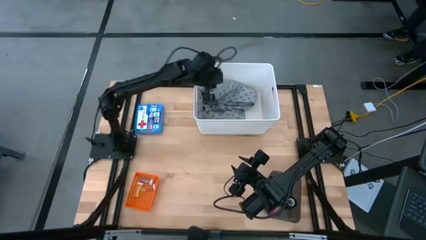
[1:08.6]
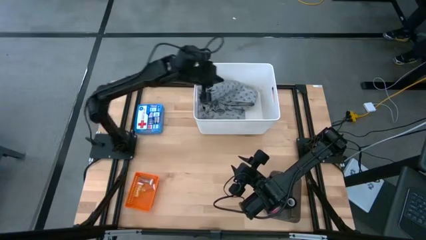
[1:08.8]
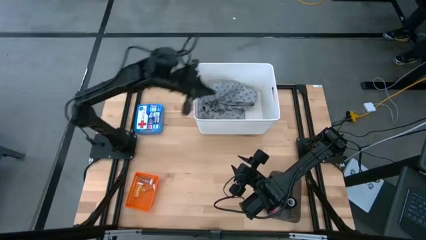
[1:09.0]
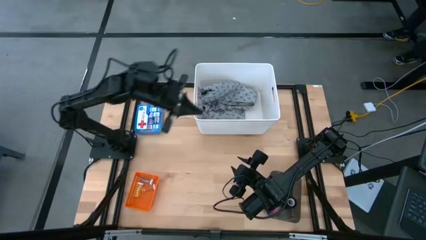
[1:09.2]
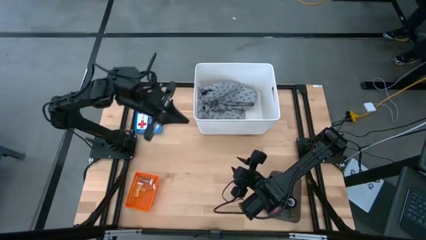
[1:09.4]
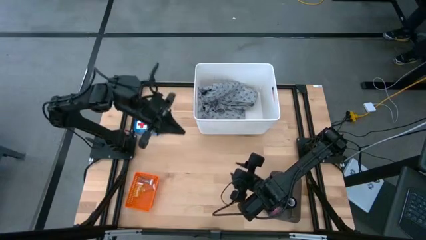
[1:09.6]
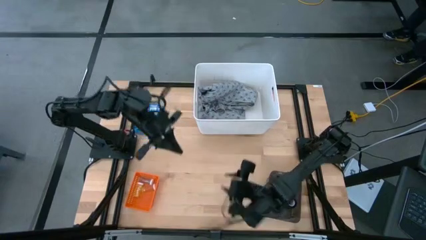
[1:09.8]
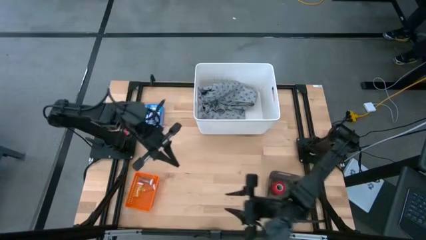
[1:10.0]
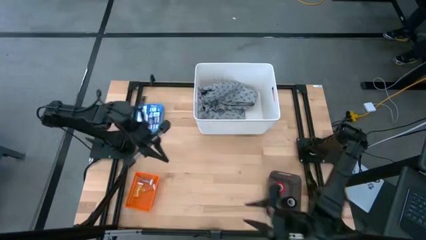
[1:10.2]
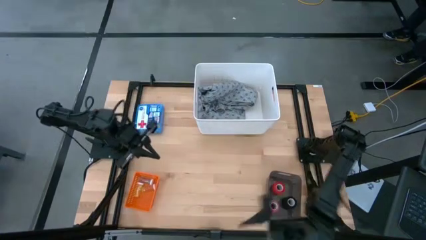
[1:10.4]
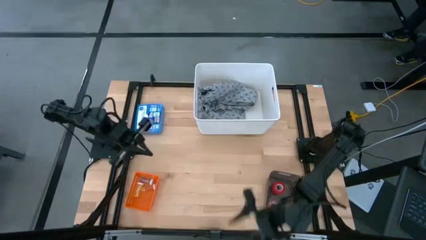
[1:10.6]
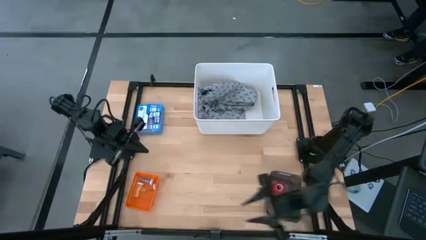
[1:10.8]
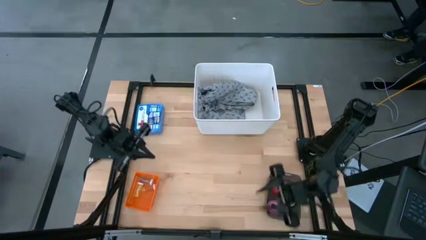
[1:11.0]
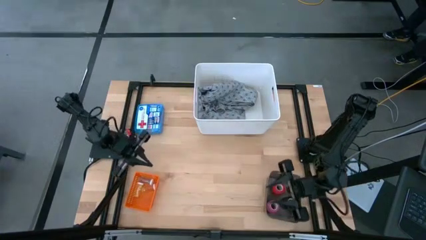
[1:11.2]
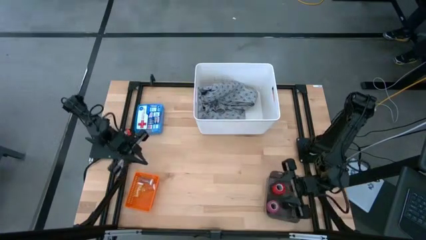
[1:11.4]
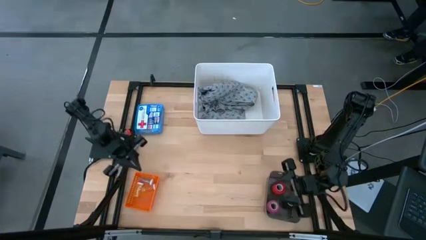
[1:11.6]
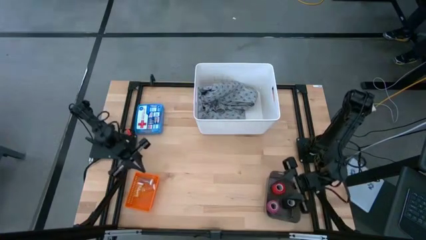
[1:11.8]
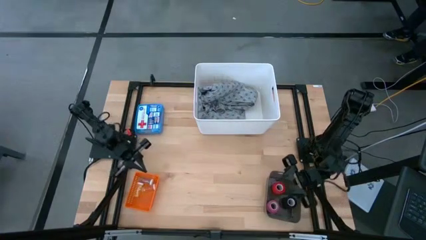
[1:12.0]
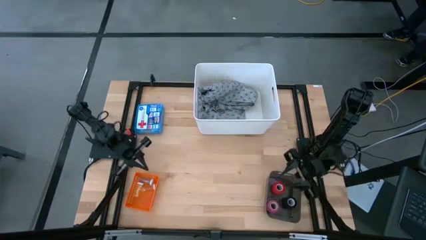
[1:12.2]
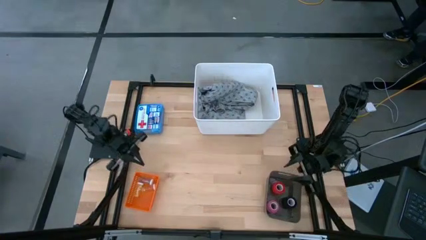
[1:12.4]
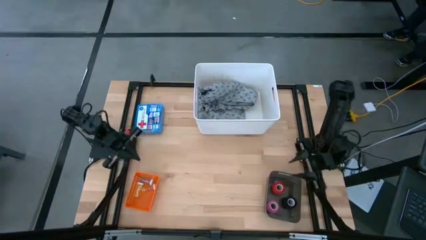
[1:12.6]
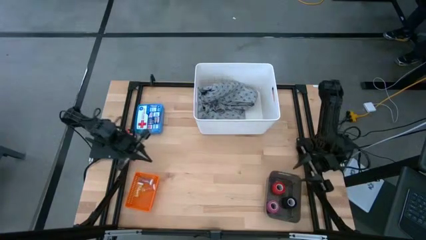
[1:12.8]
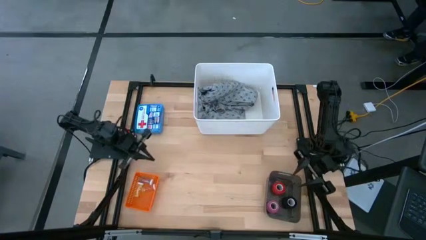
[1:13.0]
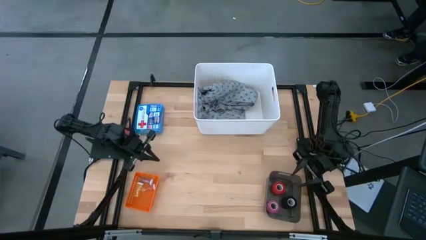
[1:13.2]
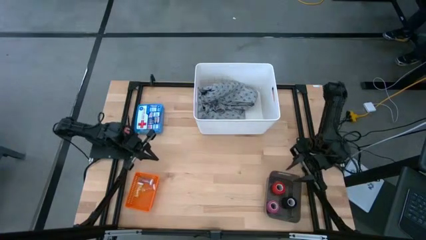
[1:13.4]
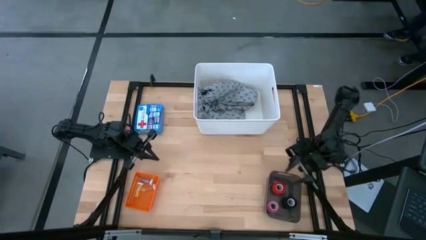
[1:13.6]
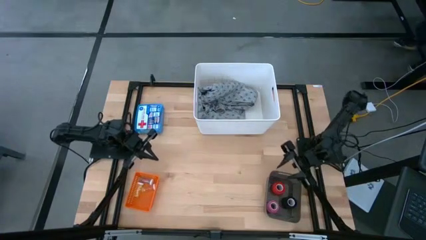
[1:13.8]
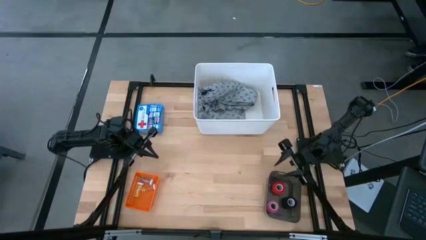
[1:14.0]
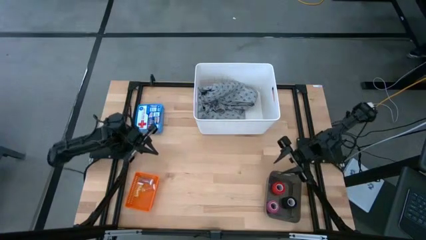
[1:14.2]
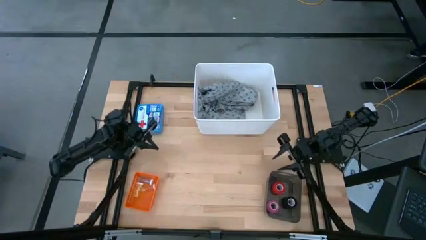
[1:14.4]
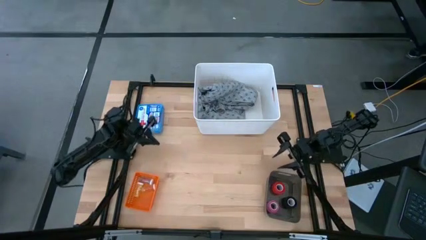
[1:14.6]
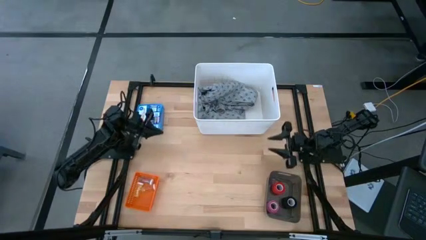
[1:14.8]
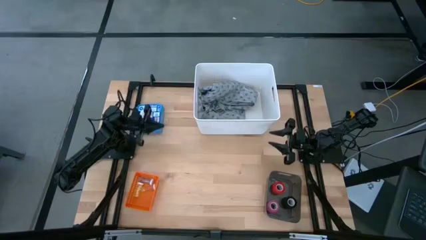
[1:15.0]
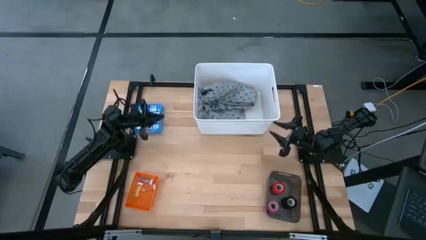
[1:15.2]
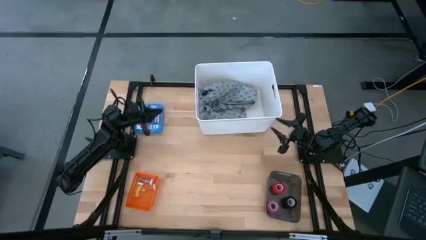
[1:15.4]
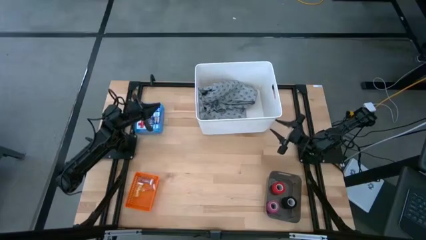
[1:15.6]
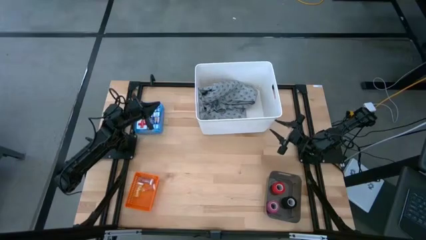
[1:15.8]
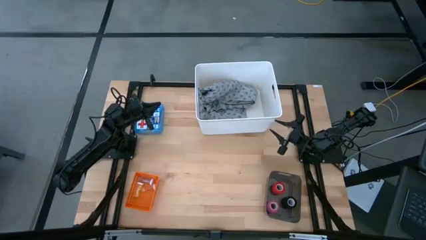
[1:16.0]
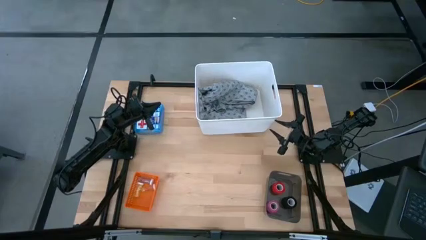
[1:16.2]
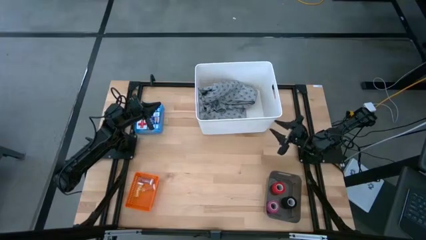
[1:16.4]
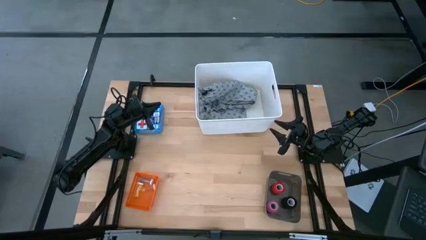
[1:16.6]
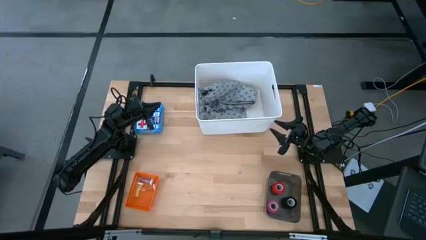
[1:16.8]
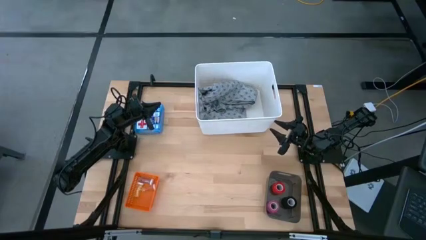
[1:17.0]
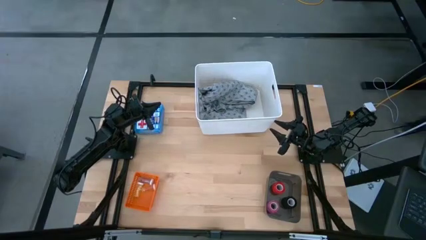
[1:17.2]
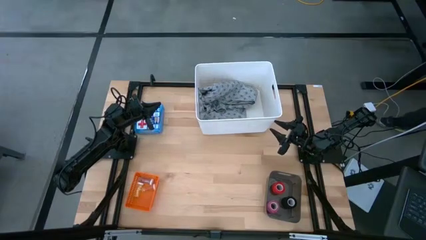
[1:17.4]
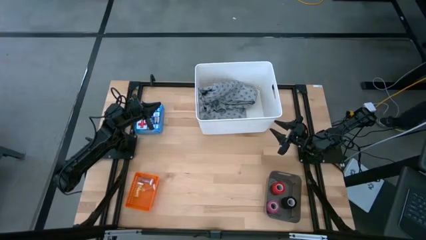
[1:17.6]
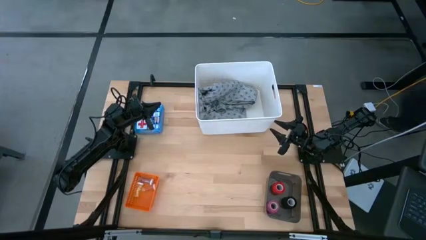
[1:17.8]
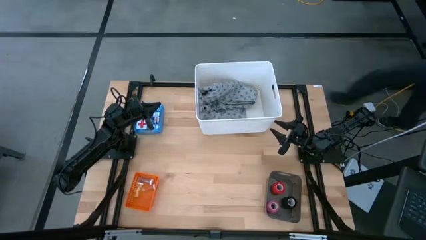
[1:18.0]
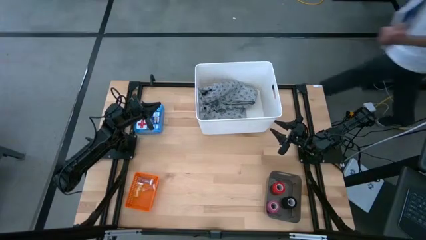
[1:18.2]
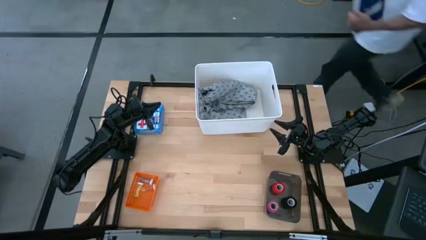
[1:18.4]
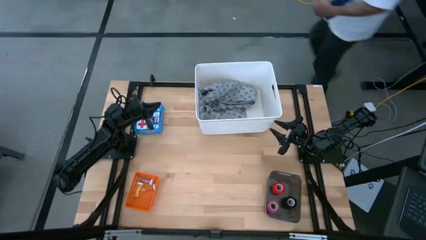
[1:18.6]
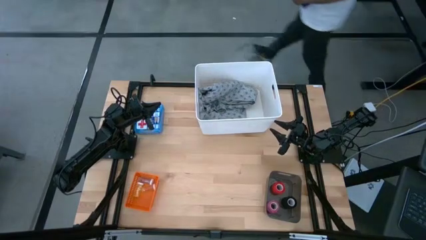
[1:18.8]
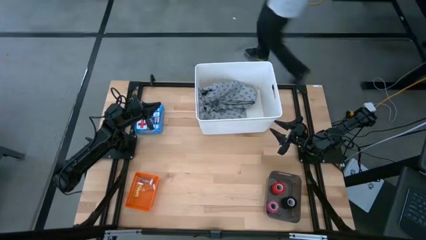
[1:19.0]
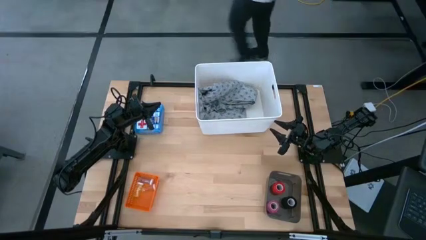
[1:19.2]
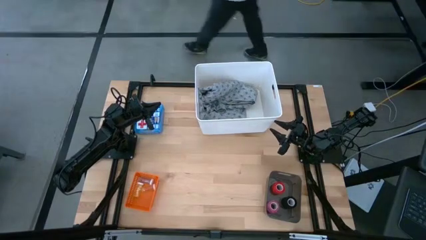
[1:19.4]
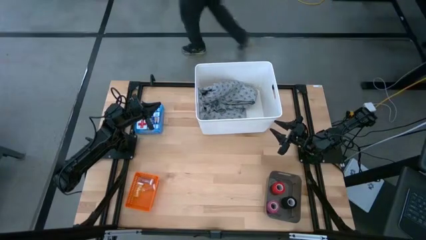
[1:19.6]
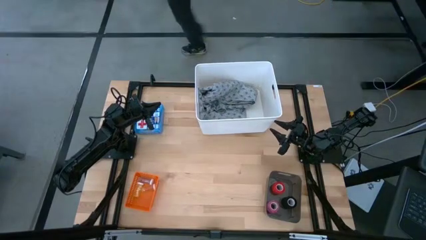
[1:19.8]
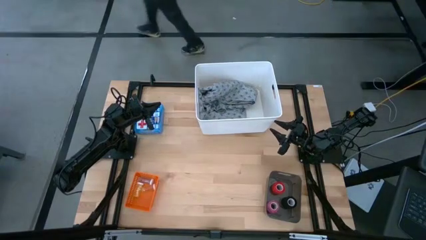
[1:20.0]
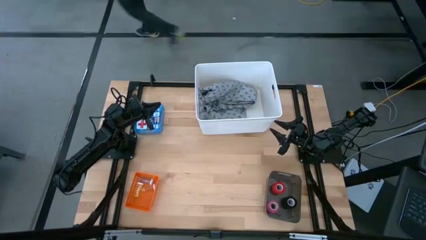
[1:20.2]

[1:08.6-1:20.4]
Task: Pick & Place Medicine items
Return to Home Position

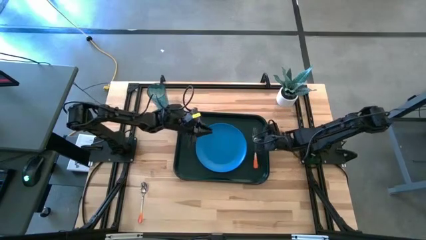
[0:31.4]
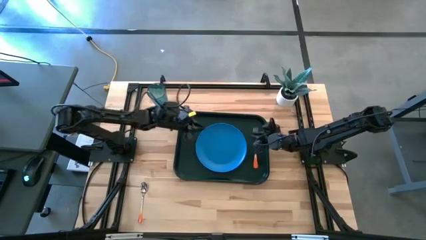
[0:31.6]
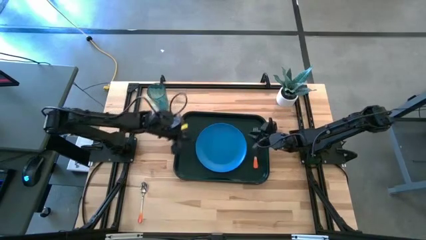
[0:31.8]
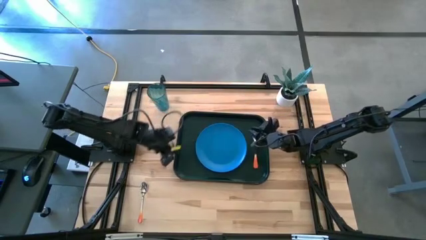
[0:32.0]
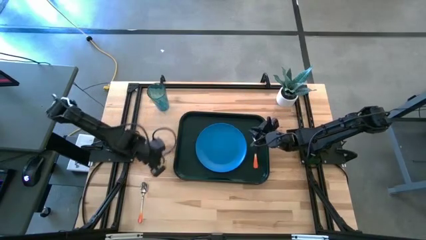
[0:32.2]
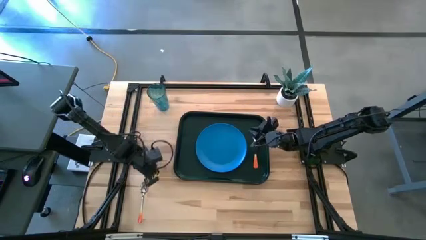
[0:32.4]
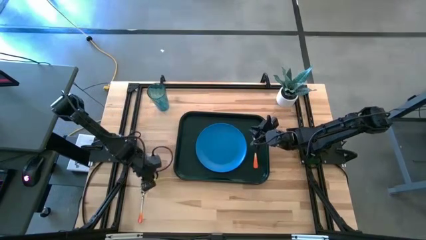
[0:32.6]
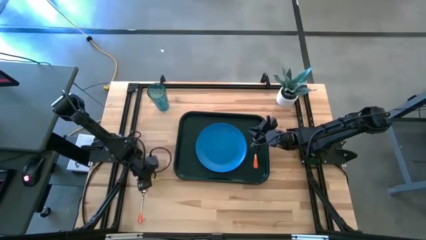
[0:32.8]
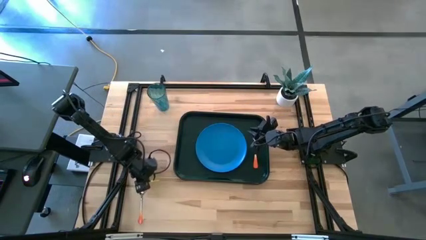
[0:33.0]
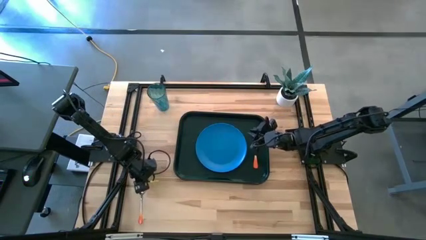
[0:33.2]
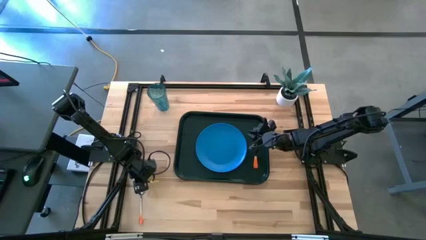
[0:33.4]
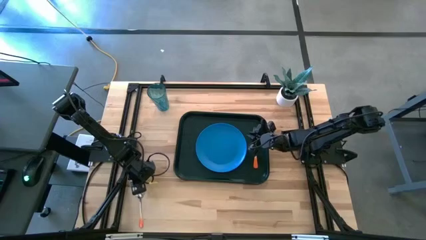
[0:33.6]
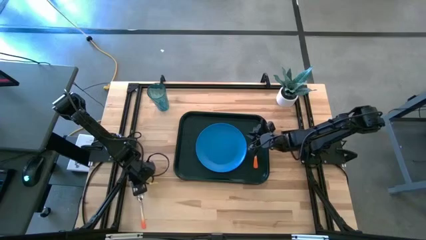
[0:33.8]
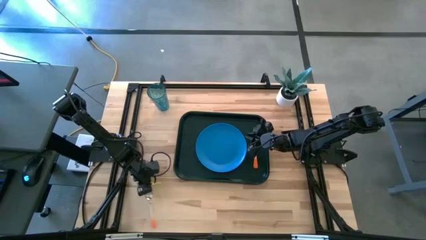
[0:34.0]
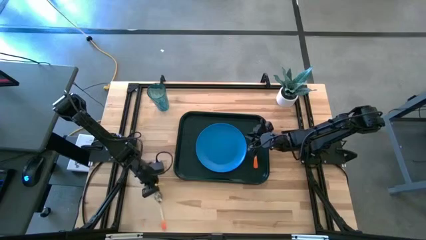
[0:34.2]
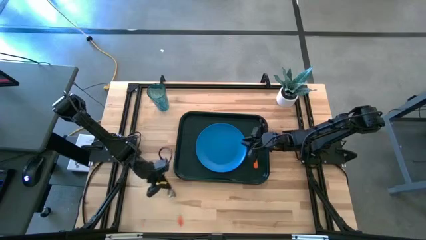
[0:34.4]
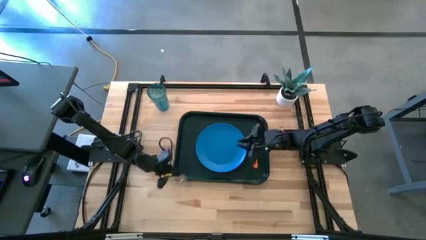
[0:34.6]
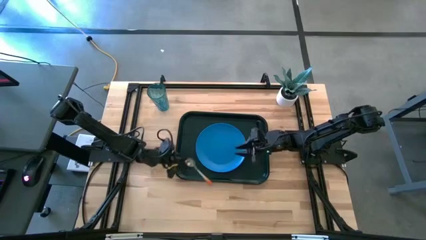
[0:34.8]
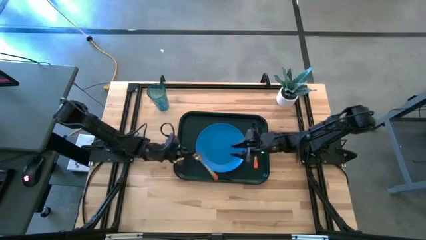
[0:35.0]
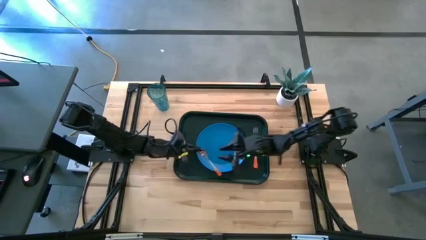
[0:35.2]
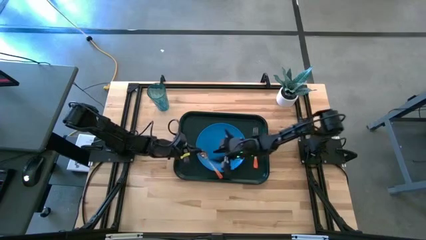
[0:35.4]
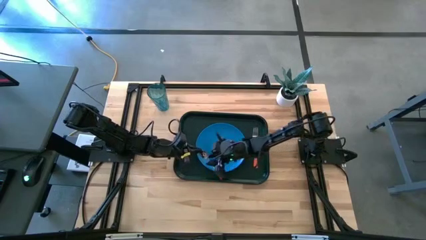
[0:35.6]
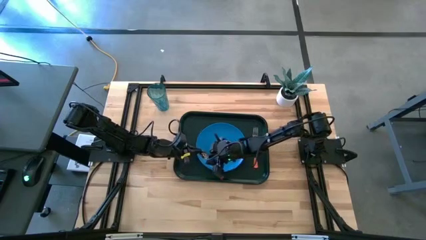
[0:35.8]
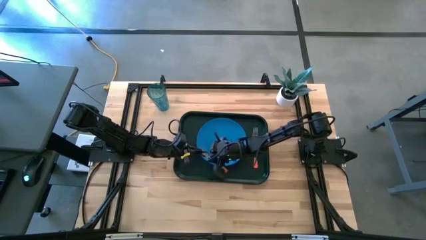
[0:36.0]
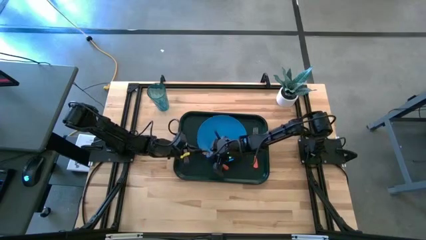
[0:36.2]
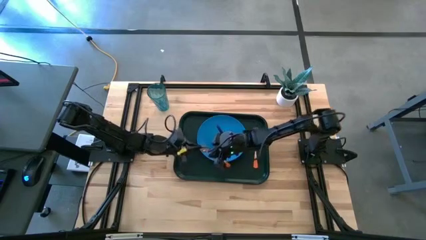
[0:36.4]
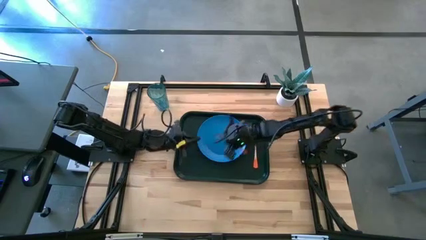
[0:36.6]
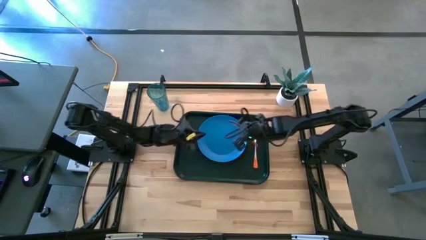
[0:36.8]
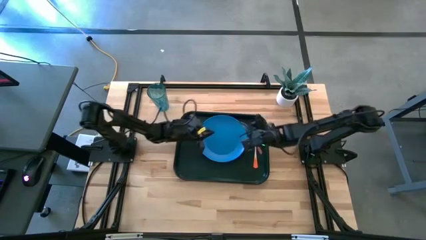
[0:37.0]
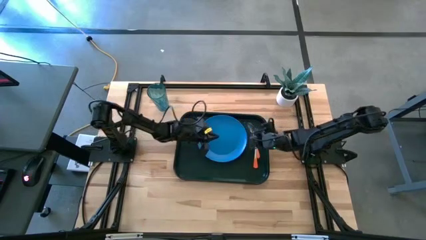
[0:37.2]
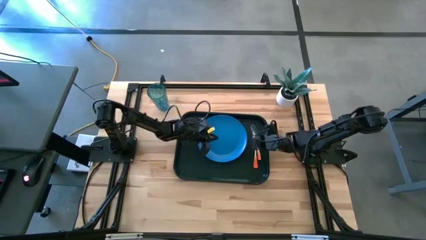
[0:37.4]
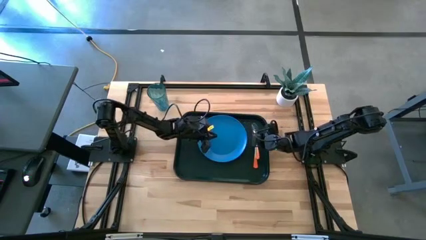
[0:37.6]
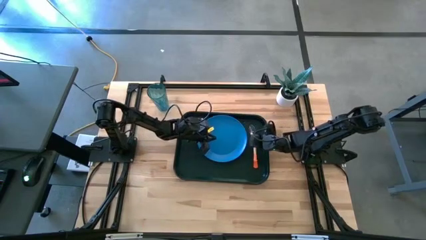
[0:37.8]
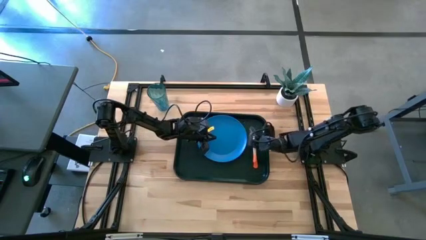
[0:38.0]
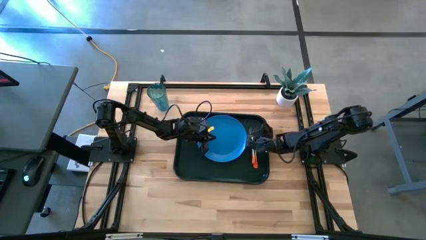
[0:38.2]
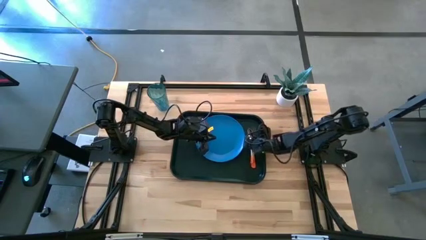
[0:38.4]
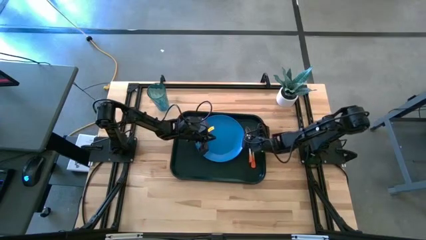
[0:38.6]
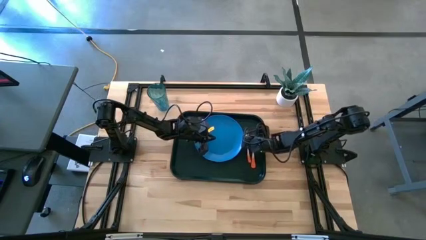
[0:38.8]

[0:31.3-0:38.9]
Task: Pick and place plate/cup/fork/spoon on tray
Put the orange spoon on the serving tray to the right side of the blue plate
